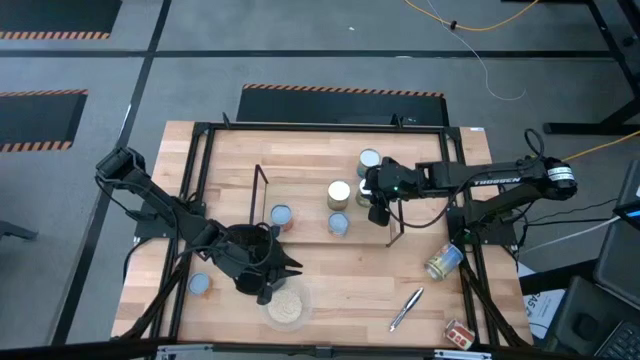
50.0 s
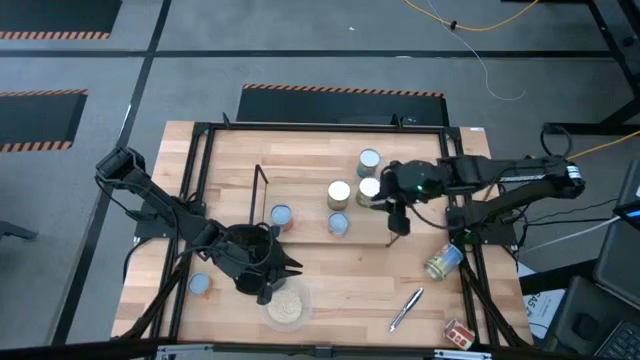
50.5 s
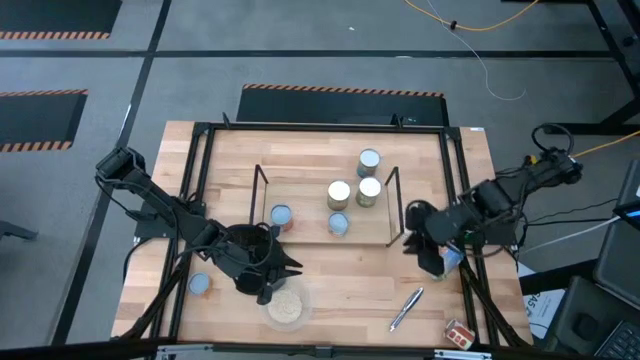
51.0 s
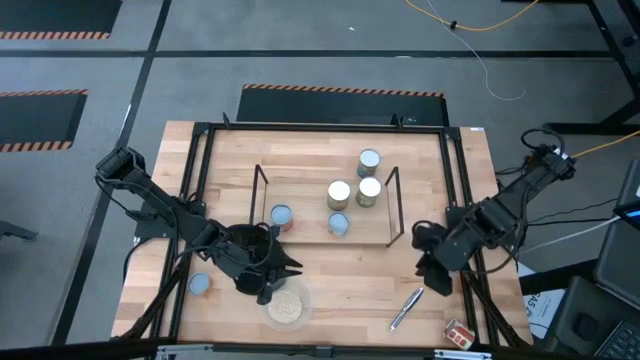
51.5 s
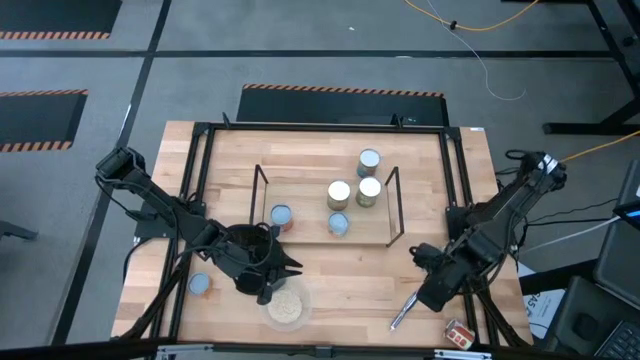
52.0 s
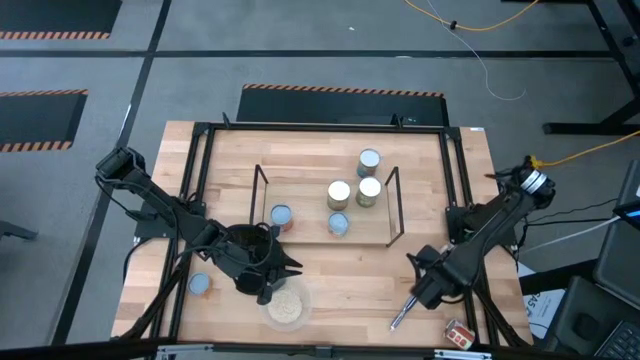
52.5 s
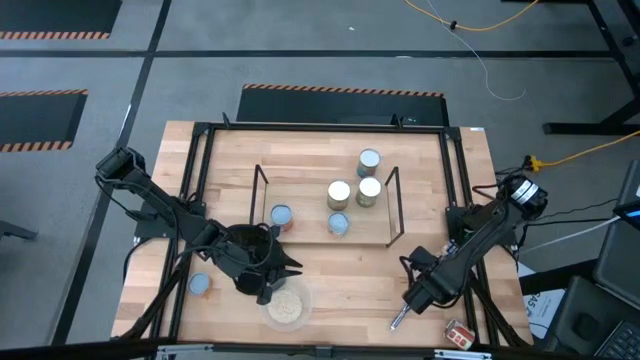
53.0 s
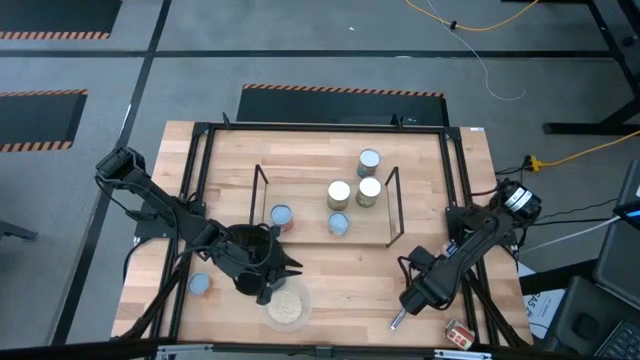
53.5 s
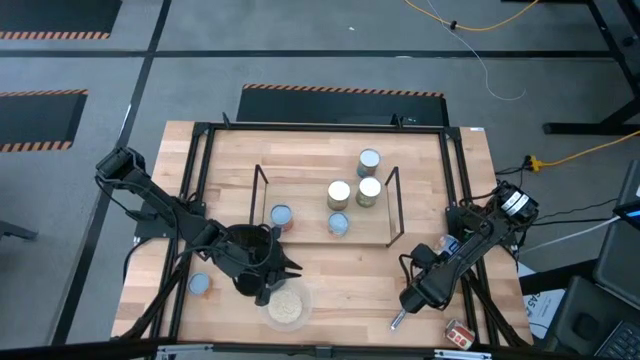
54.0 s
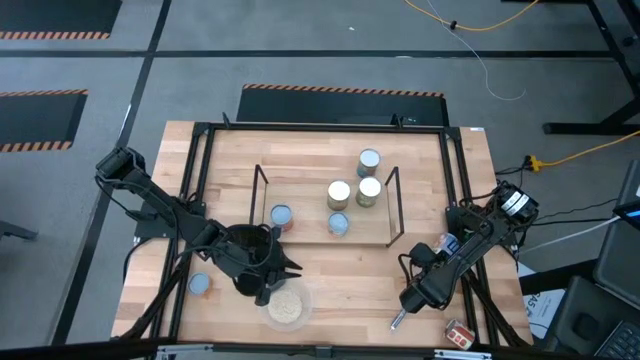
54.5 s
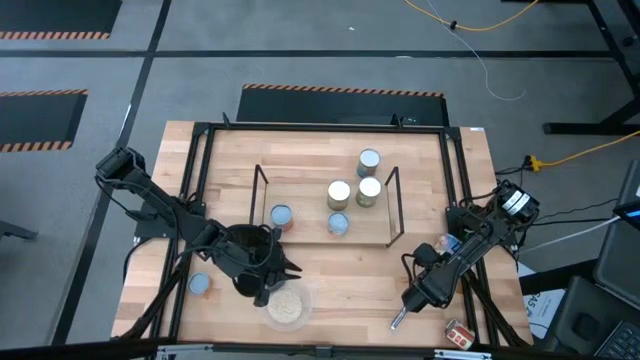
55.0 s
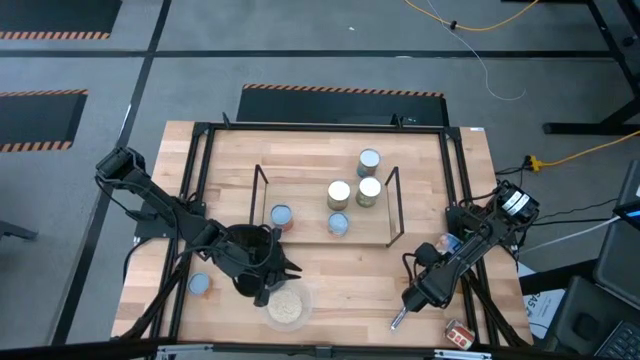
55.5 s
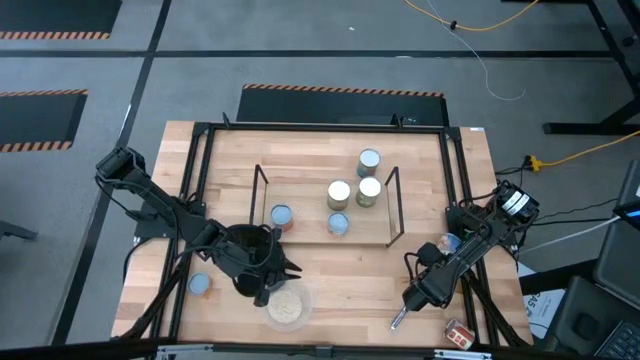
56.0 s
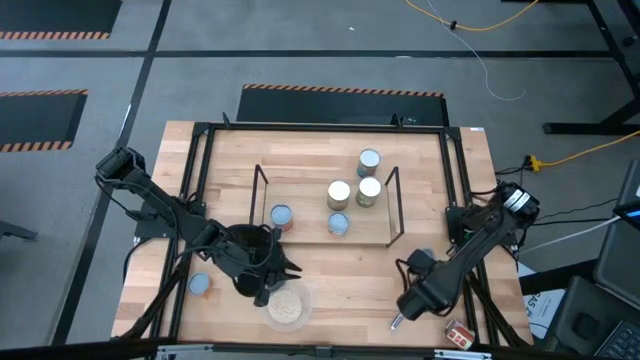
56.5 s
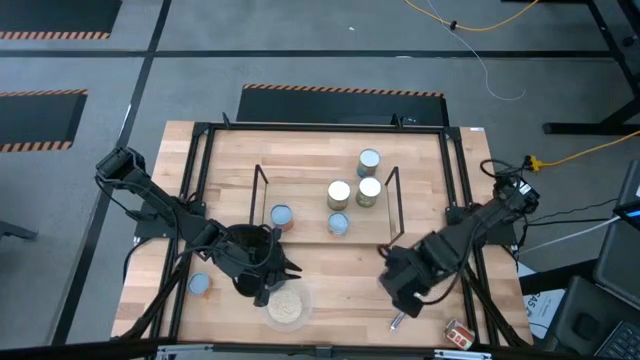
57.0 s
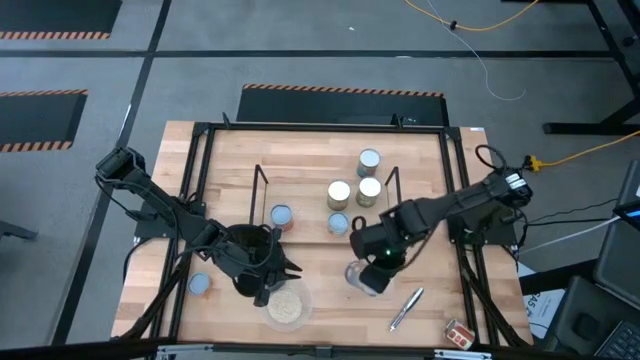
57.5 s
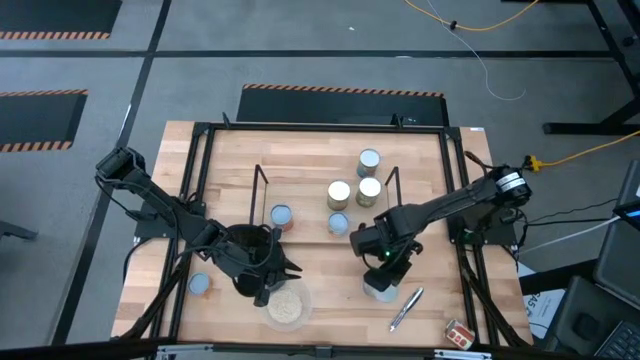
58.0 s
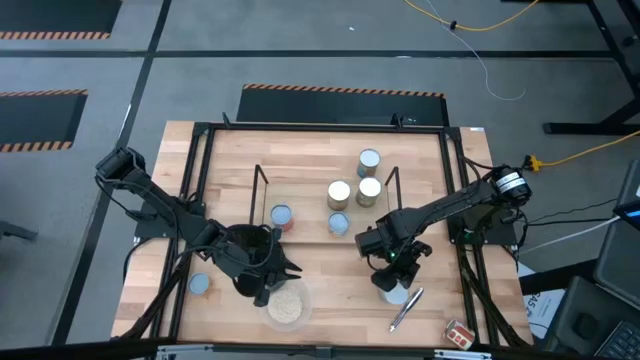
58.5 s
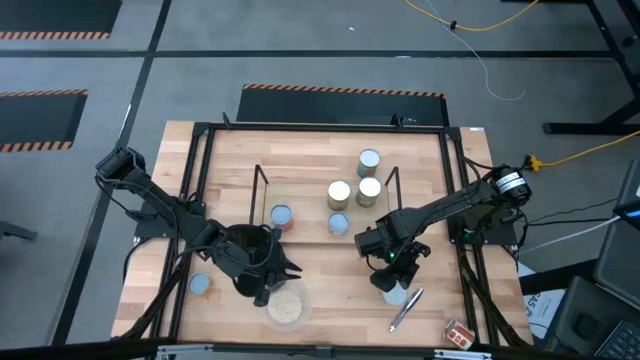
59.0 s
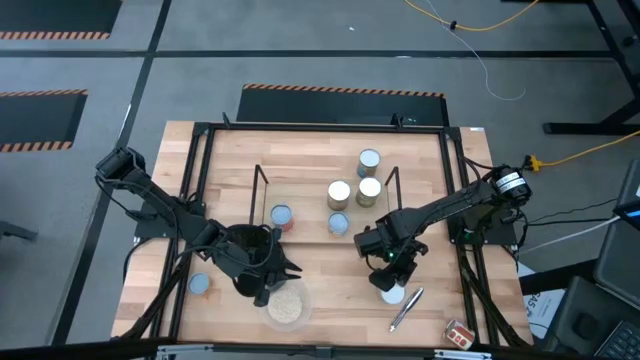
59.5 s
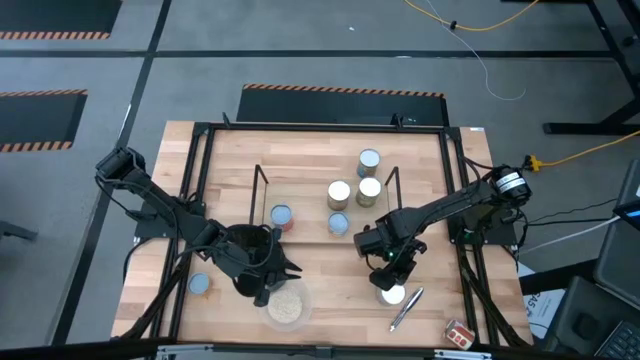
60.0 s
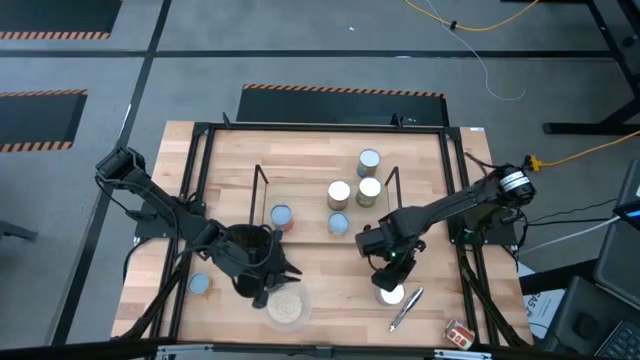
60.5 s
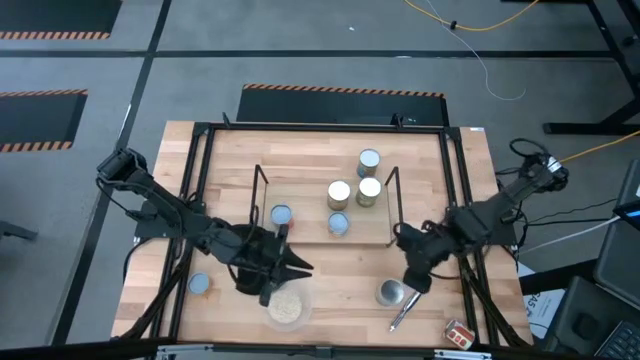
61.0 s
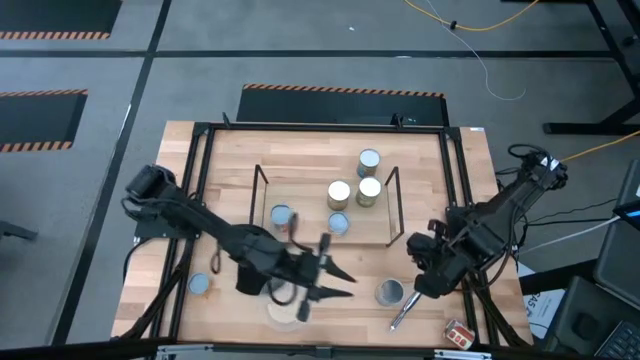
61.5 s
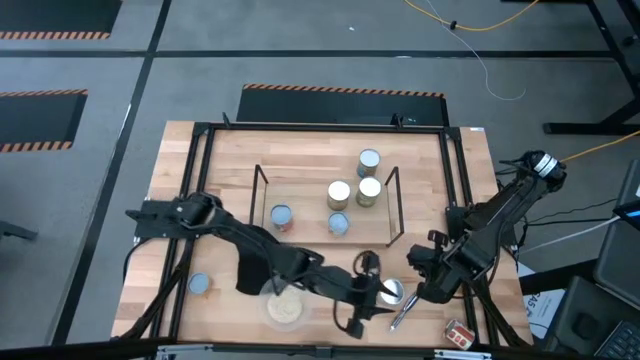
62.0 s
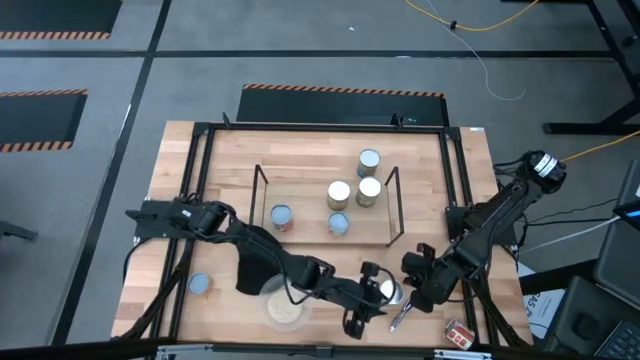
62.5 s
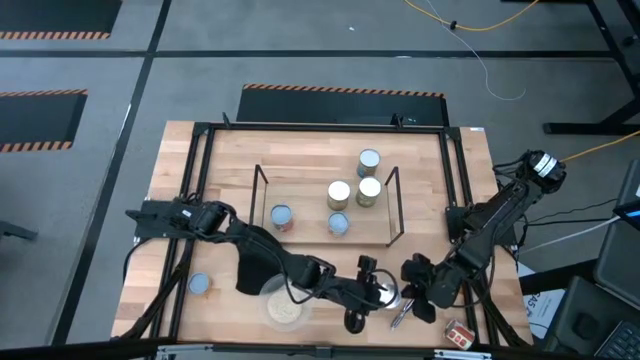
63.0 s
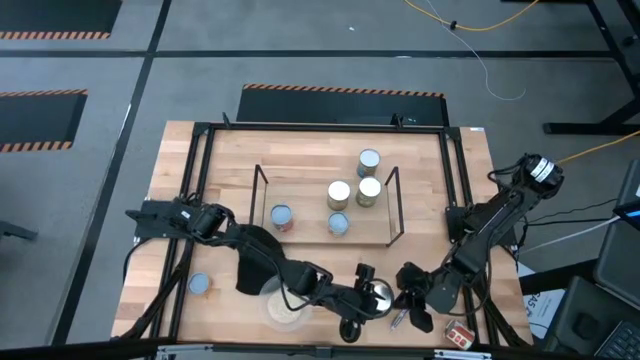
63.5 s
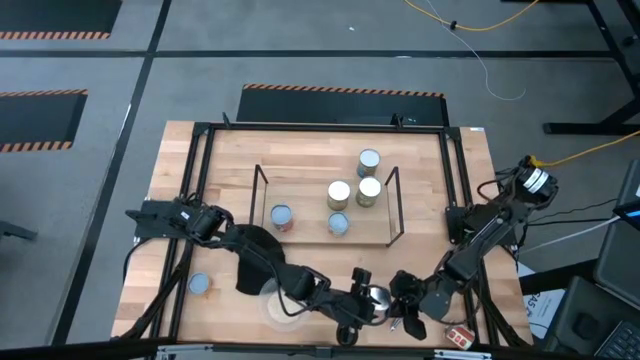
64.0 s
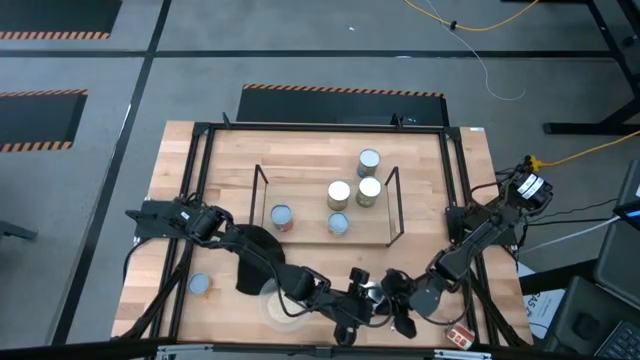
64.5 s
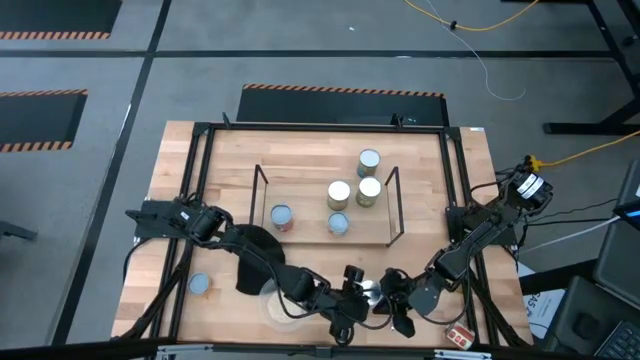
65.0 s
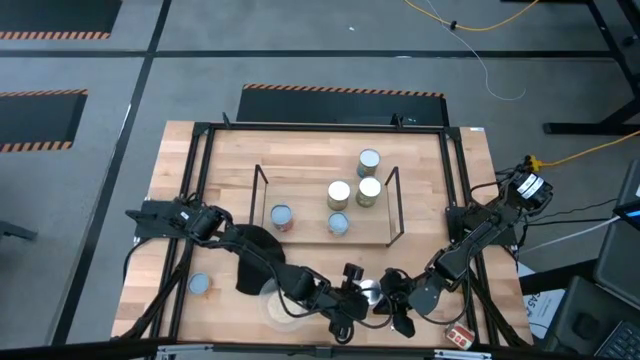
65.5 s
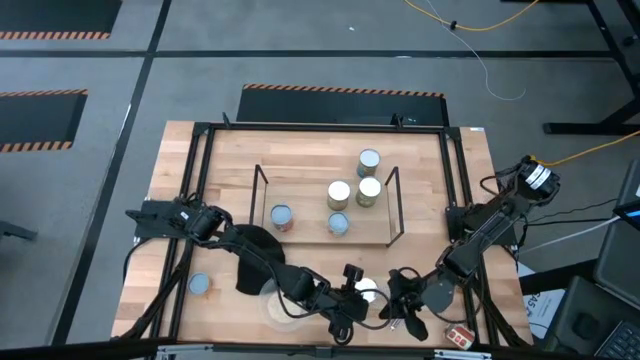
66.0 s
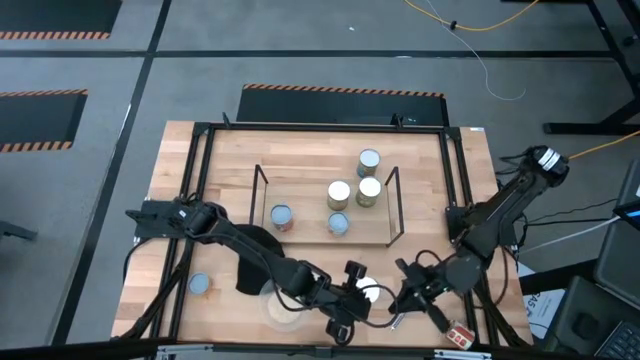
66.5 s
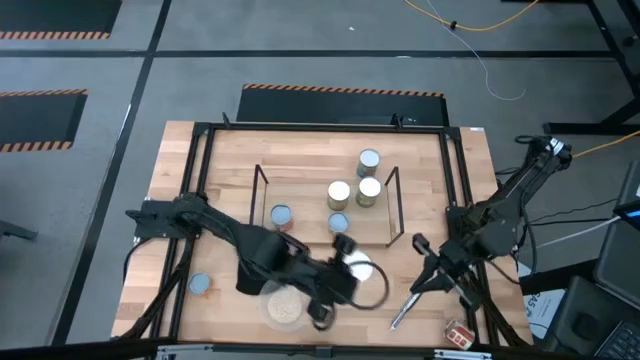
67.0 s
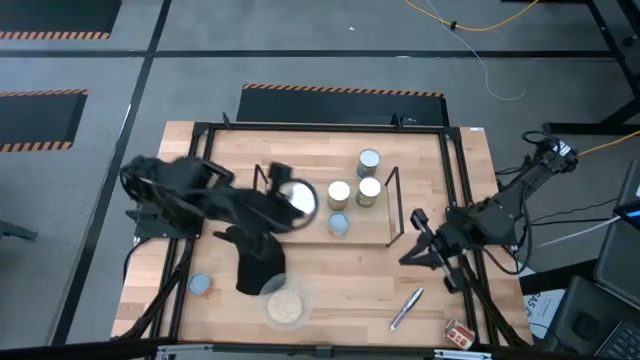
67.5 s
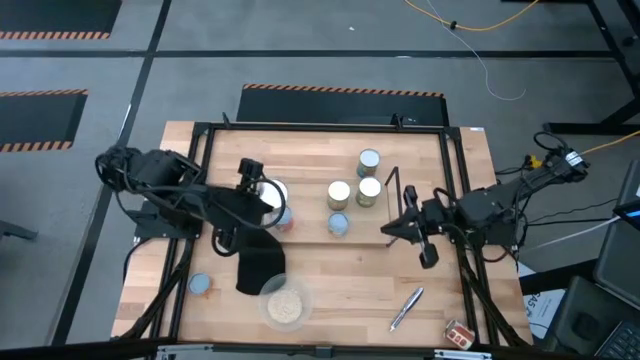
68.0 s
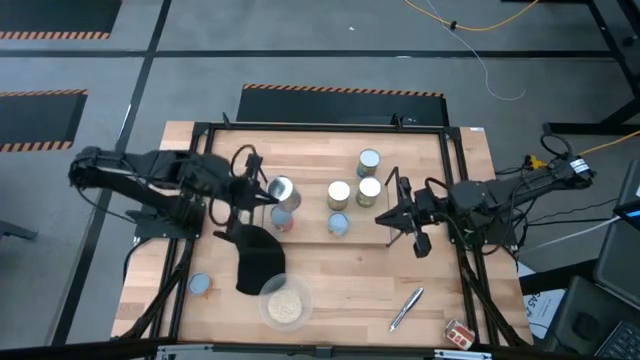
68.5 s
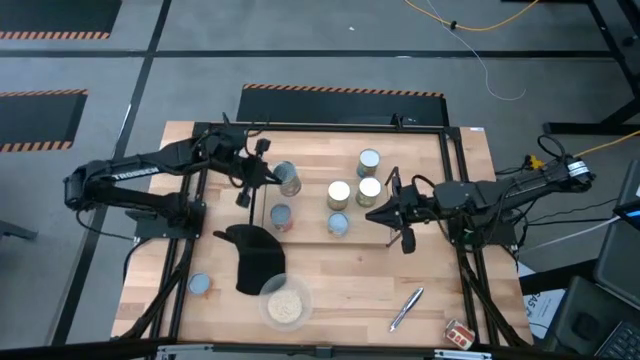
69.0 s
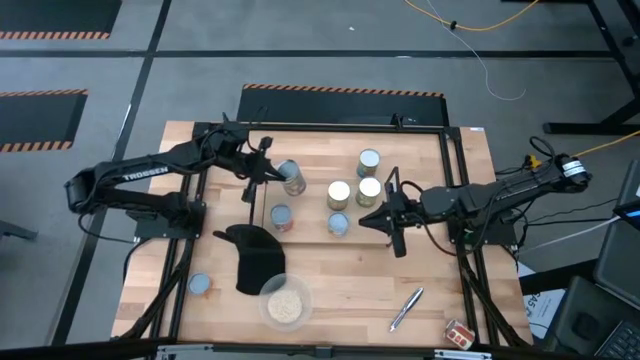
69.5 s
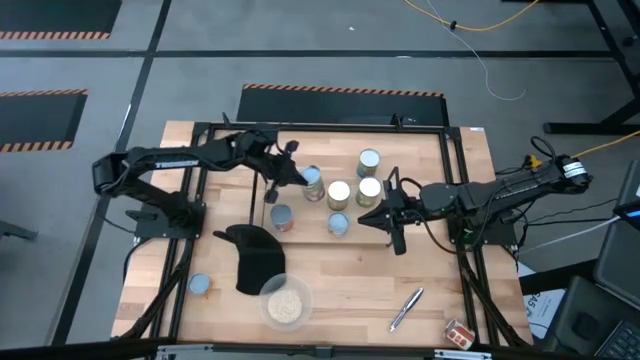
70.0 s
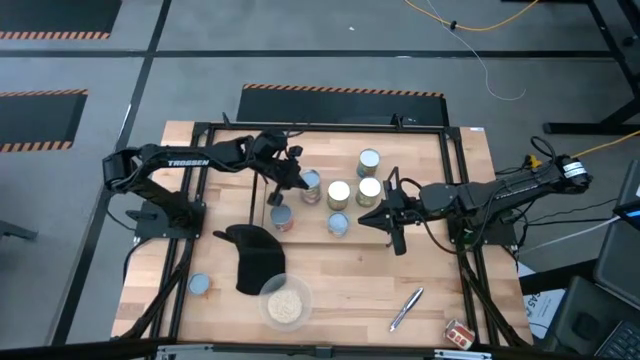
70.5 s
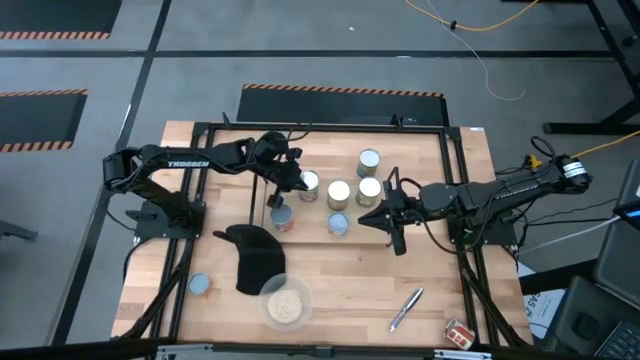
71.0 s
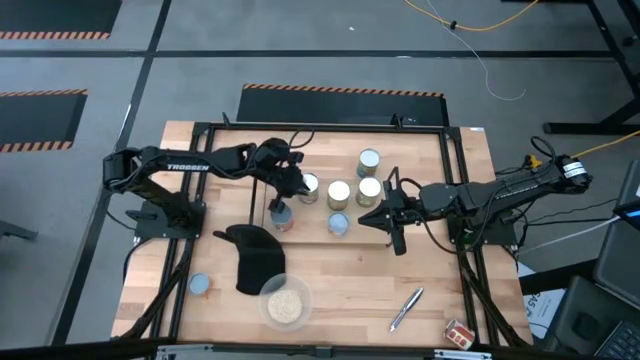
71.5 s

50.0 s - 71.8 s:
Task: Pick and place cans onto a shelf
Put the canned peaches on the shelf
